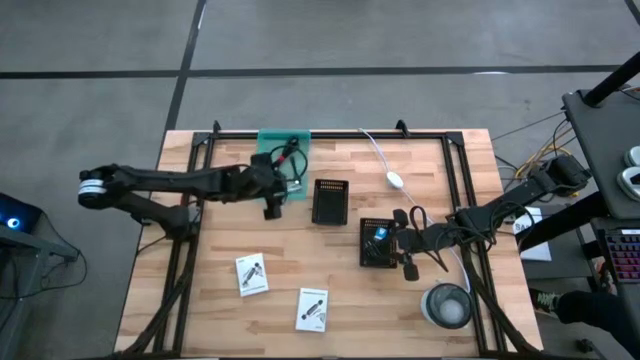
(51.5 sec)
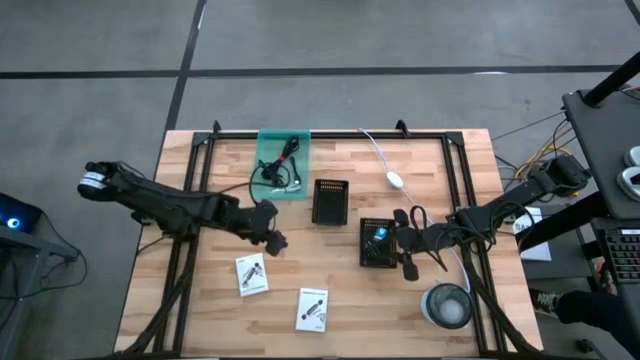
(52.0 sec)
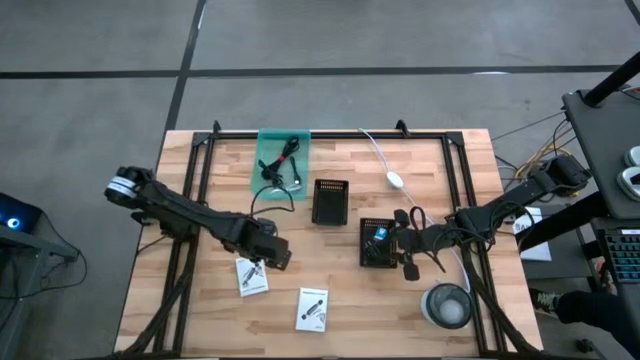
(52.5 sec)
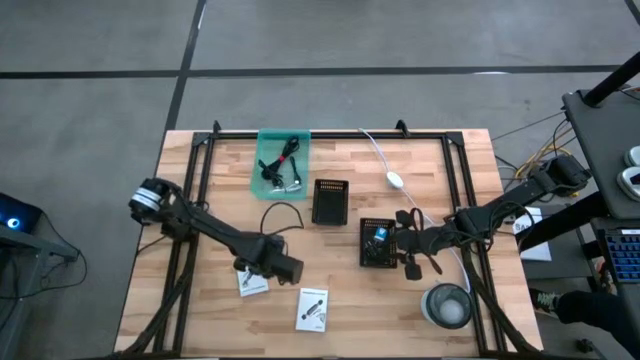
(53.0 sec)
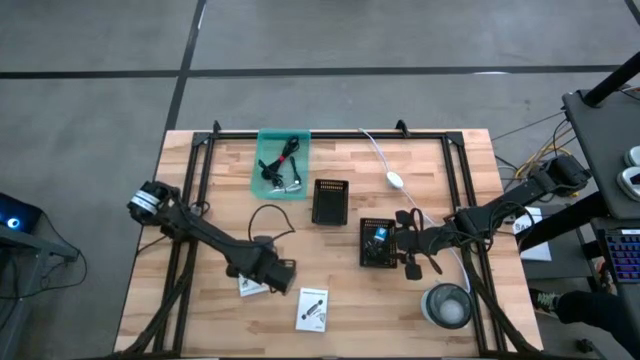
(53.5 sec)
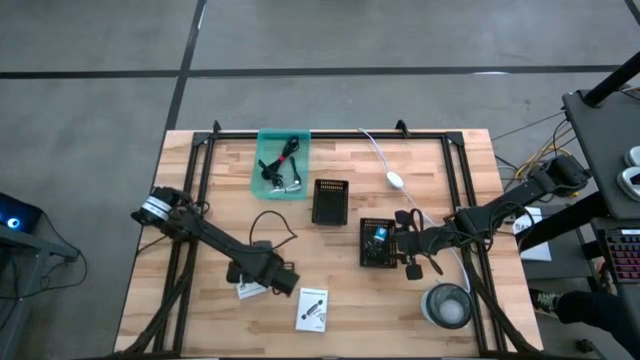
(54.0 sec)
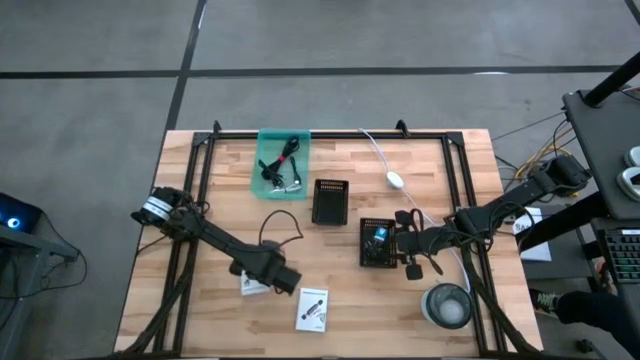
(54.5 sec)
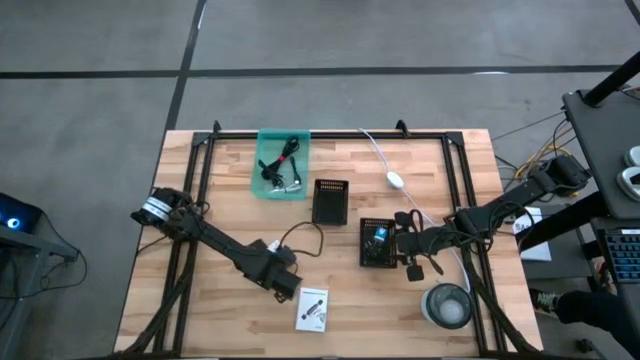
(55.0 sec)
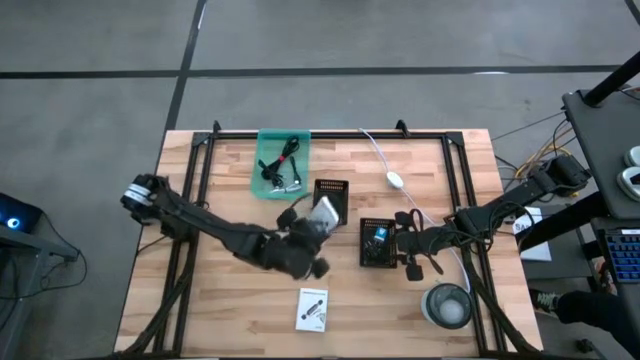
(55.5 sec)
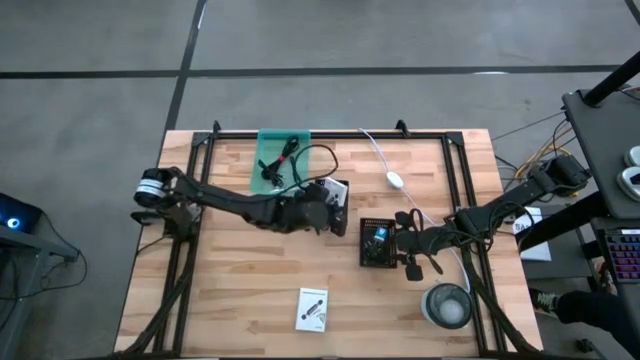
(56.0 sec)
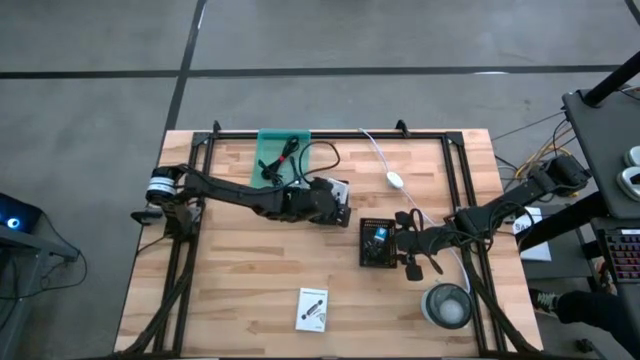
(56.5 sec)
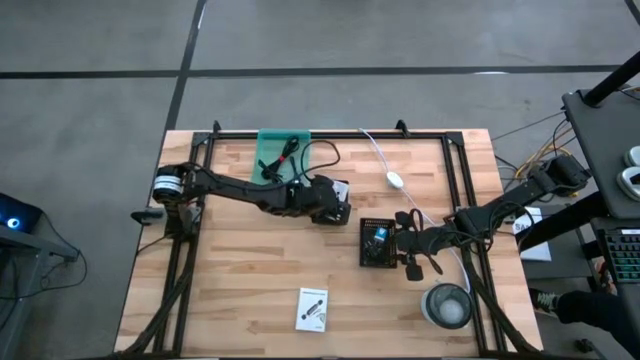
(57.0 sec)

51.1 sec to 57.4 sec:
Task: Pick and place items into bin
Put the top left white card reader box into the top black basket

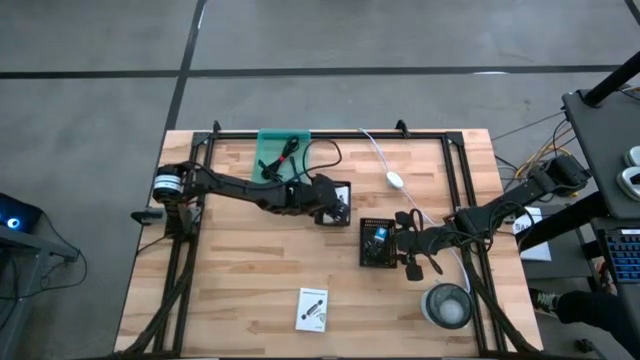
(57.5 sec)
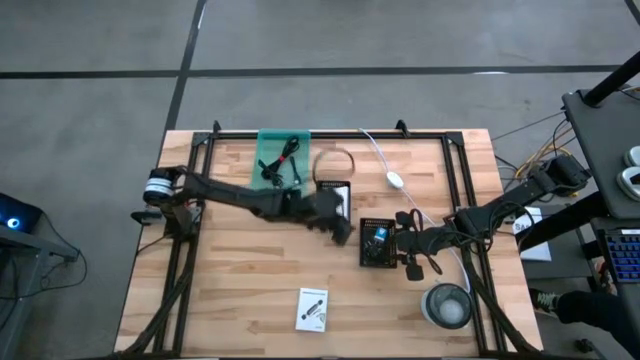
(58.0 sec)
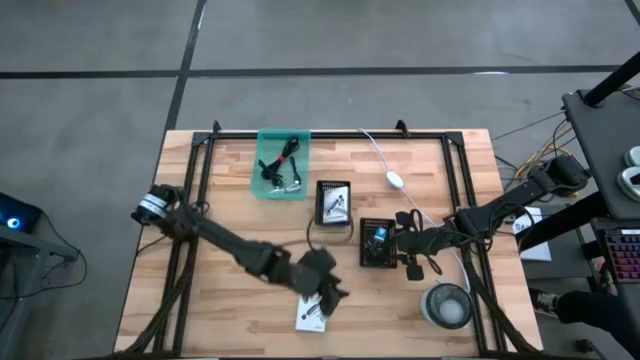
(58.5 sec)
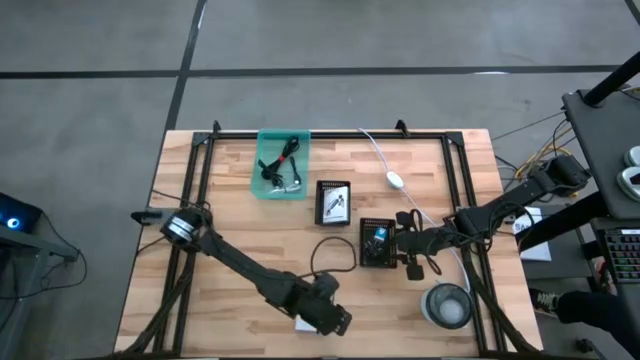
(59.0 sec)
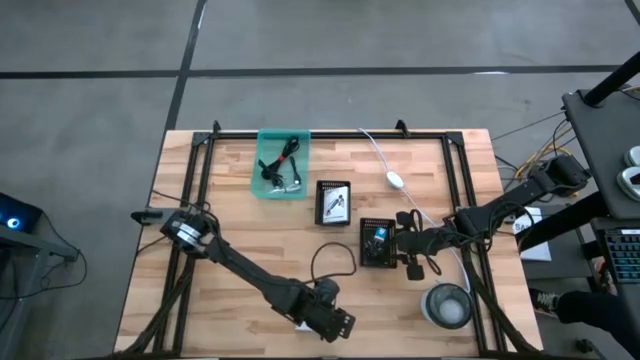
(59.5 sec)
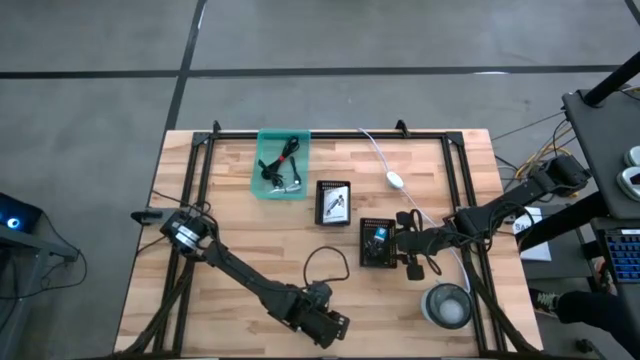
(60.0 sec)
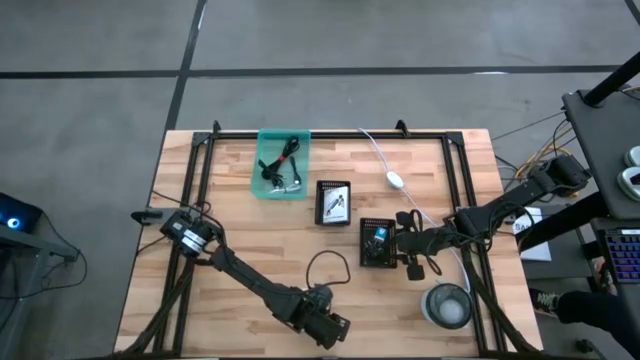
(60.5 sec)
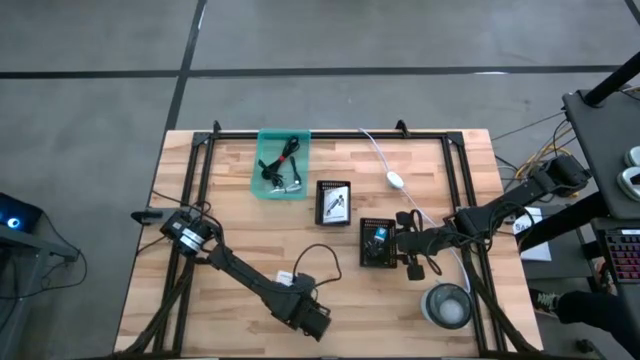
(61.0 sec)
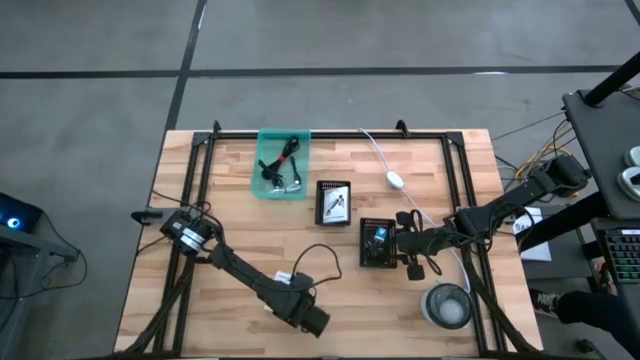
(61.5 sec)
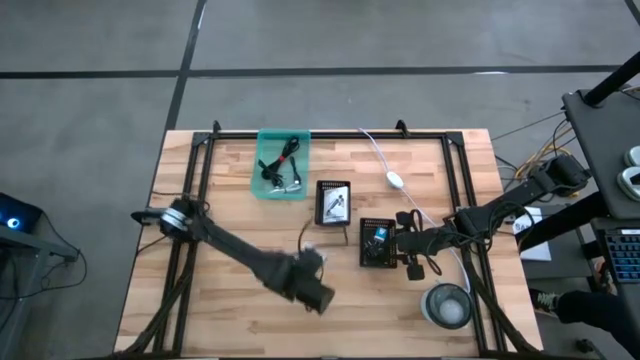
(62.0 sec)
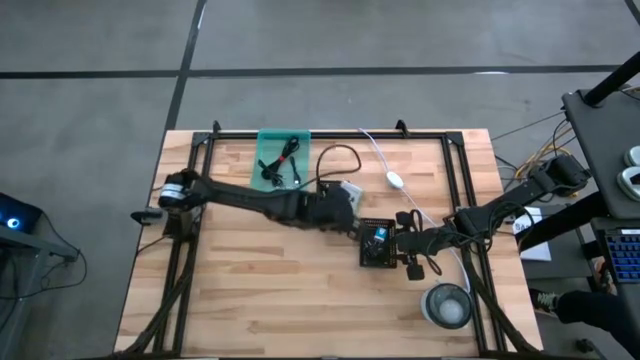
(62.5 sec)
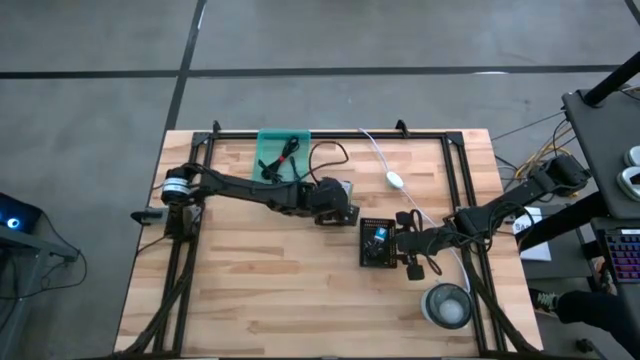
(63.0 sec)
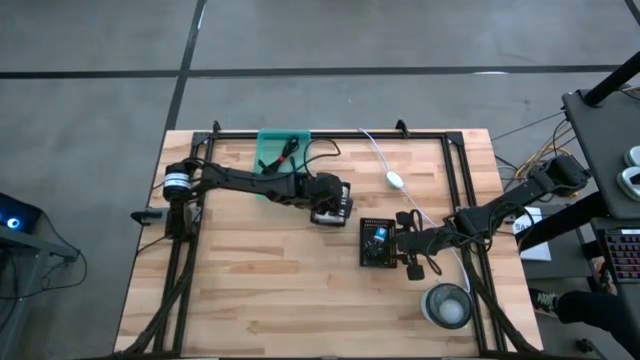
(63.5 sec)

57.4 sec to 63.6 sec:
Put the white card reader box into the top black basket

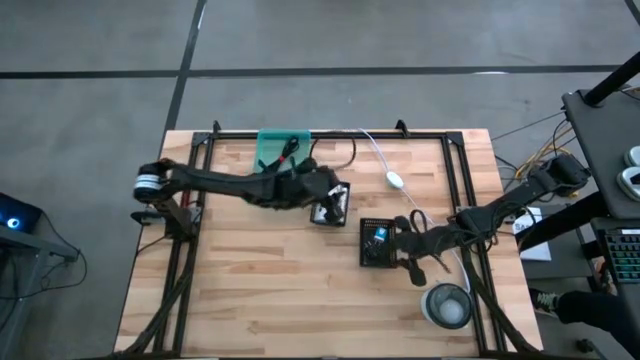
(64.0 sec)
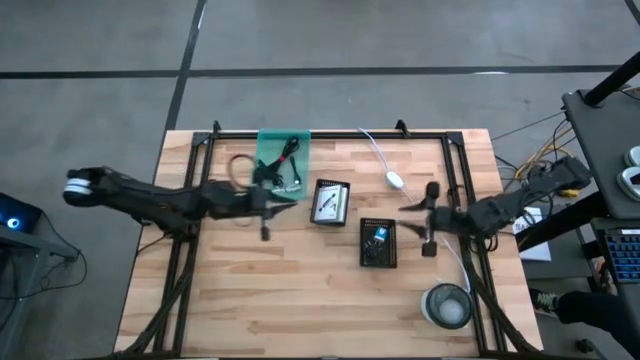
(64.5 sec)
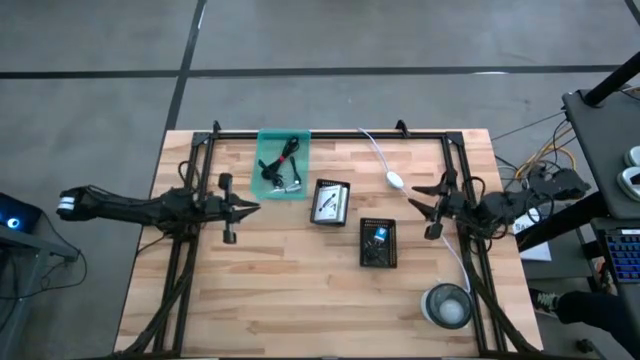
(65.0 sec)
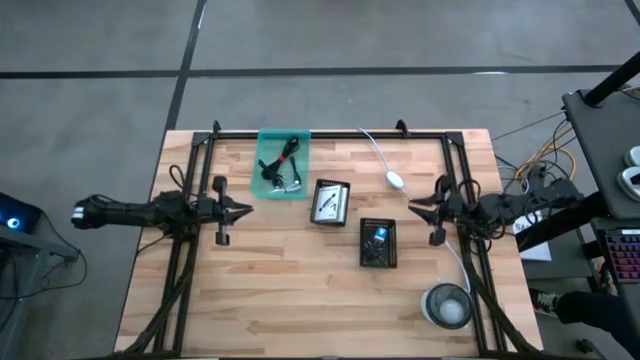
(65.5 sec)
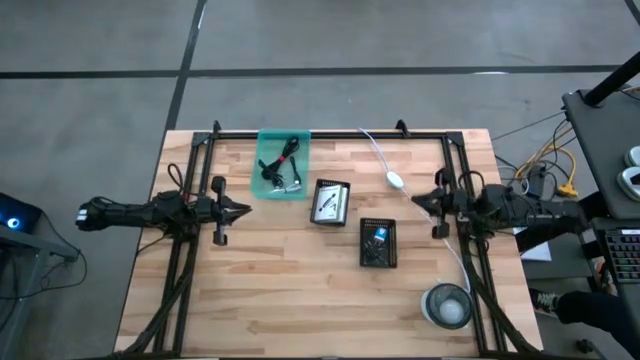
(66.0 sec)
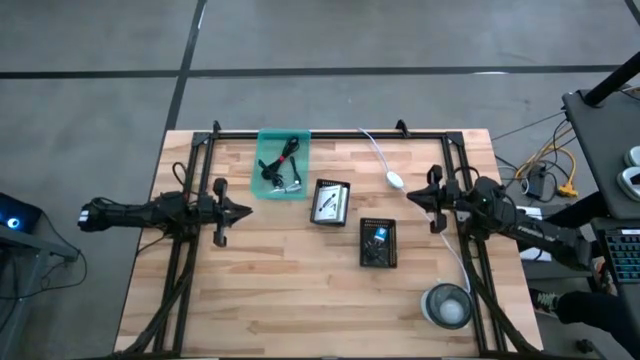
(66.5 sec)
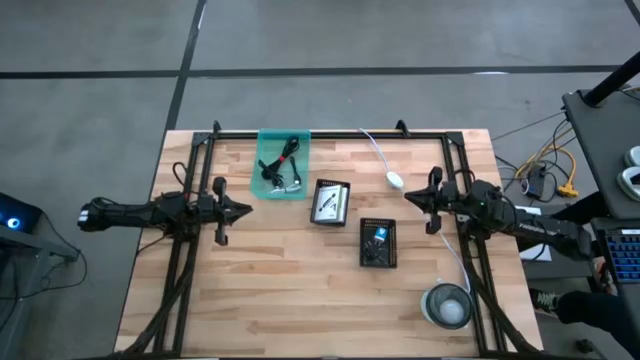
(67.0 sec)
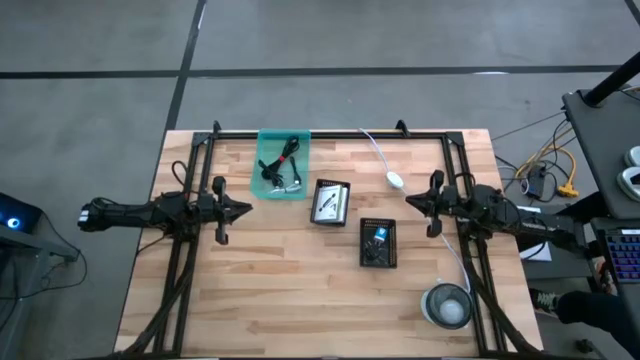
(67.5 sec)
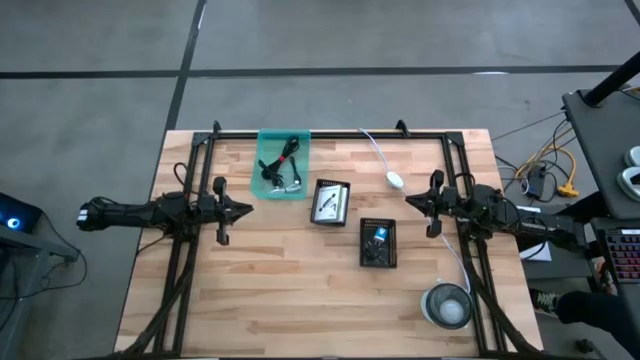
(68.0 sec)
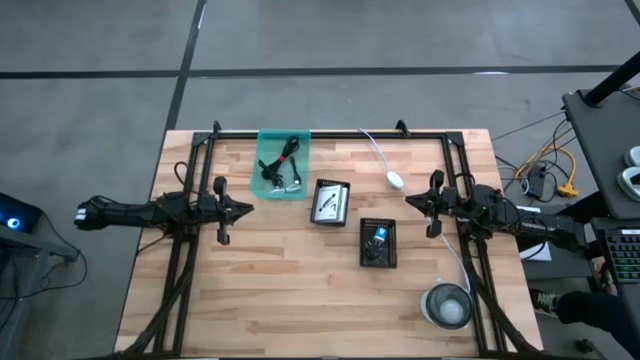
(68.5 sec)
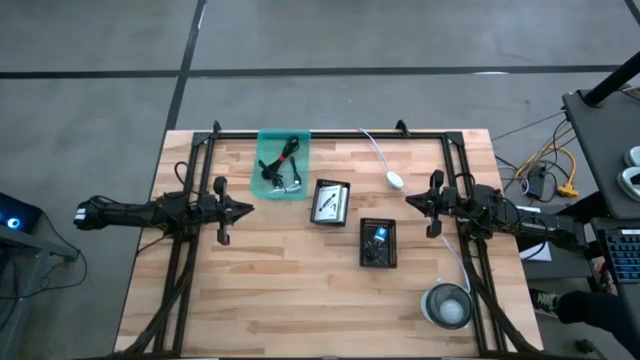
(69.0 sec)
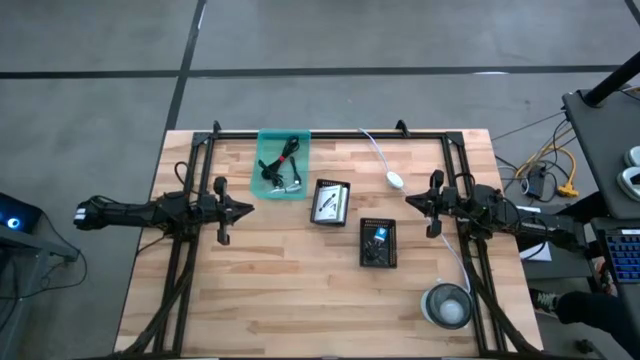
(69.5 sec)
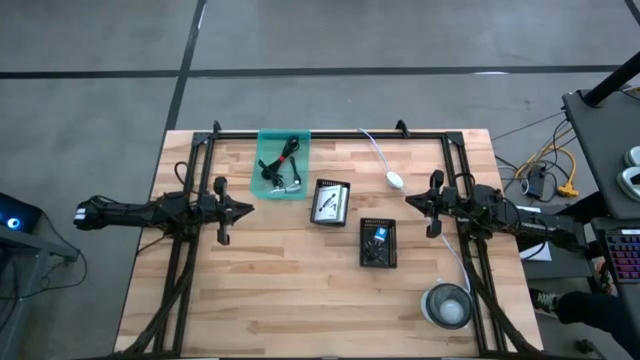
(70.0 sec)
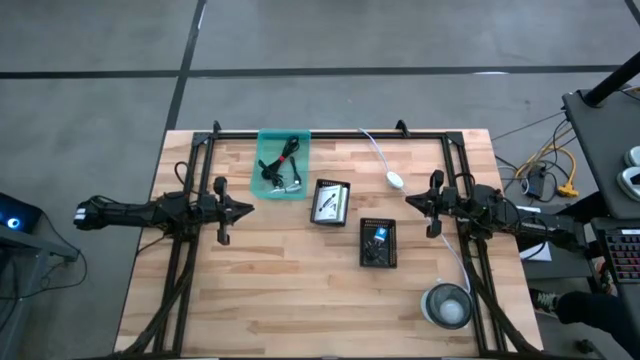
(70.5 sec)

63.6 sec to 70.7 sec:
Return to Home Position
